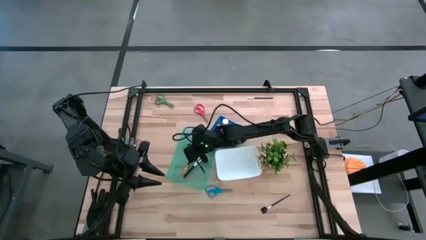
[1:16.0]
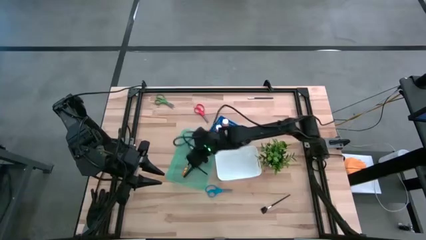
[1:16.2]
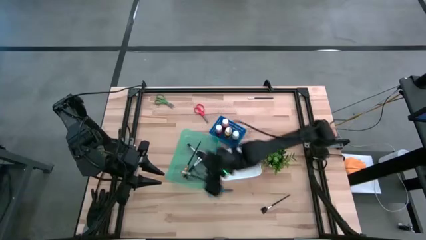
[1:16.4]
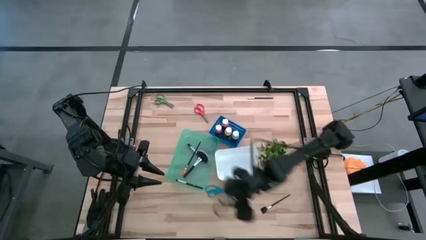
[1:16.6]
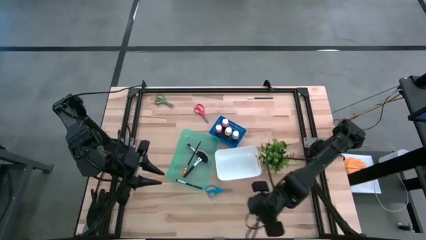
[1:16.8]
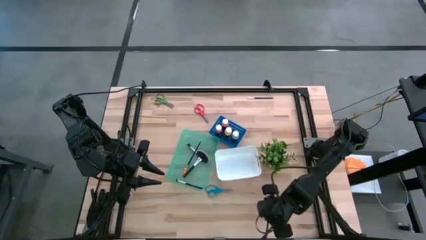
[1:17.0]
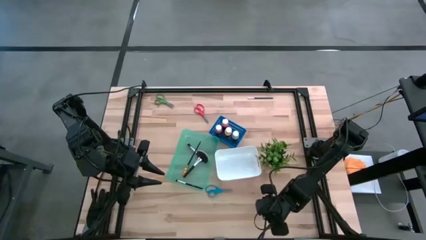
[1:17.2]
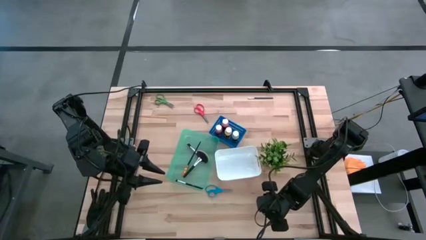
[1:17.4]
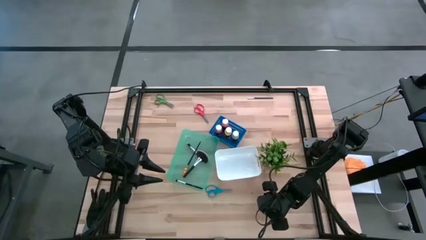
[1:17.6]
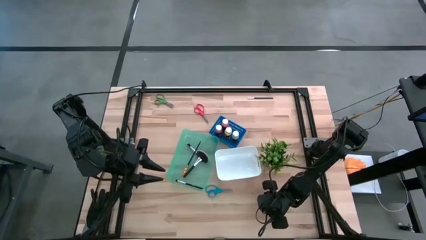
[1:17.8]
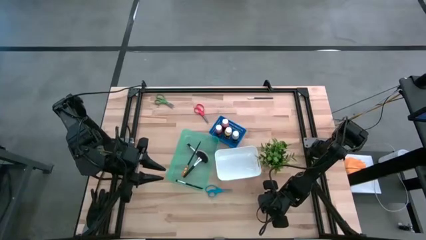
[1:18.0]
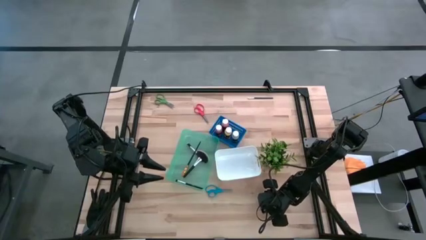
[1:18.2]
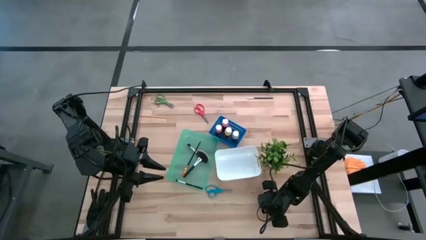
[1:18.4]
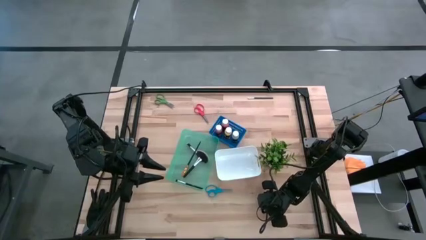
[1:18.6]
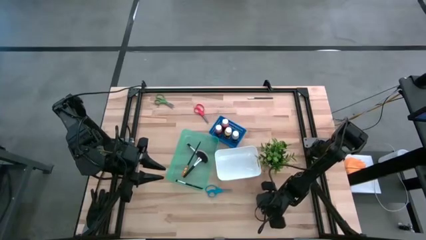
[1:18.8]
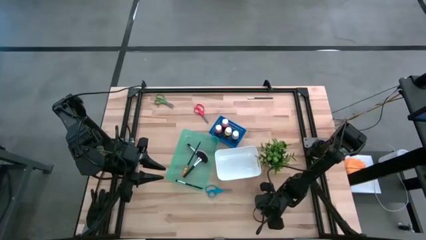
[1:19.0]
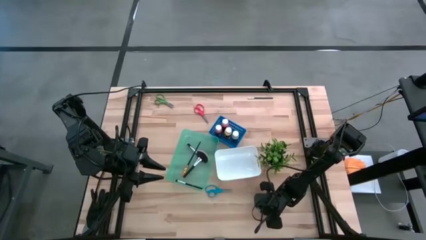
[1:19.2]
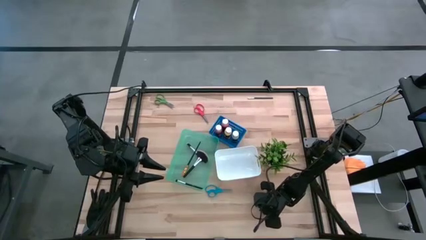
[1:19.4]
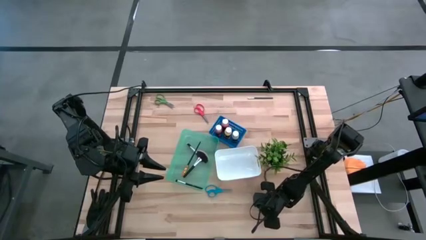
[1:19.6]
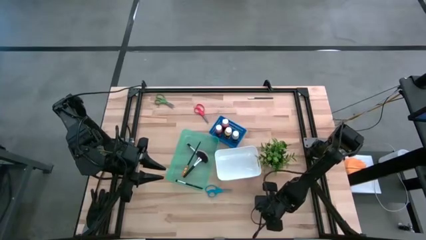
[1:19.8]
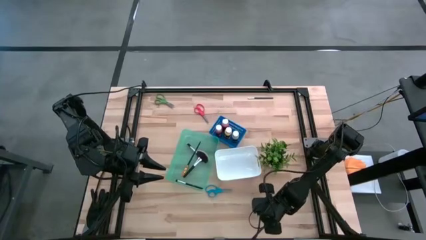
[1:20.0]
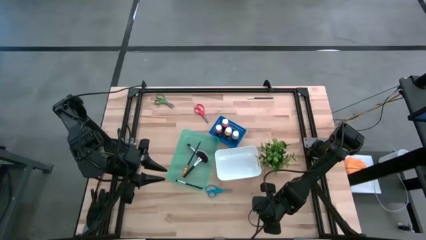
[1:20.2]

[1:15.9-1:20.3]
Task: Pick & Place Paint Supplies
Put the black brow brush into the green bin

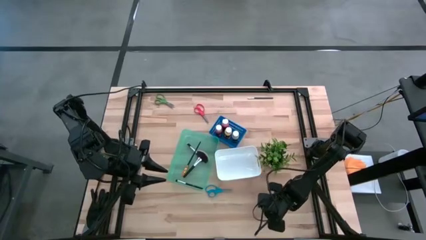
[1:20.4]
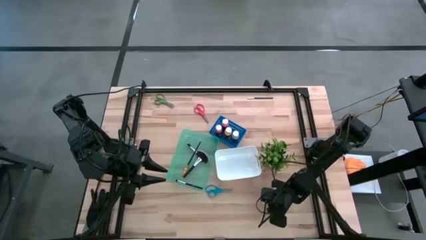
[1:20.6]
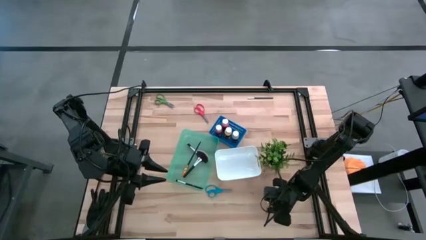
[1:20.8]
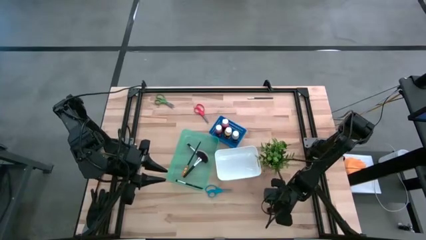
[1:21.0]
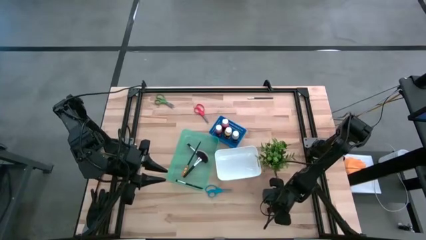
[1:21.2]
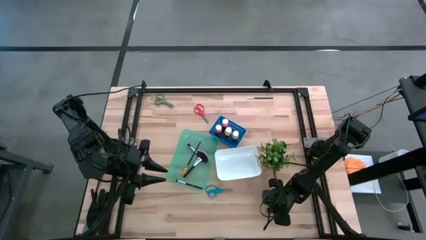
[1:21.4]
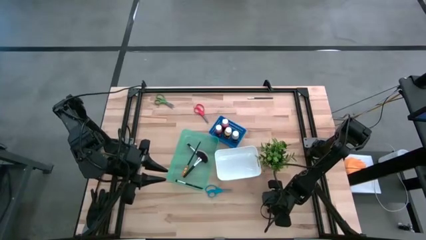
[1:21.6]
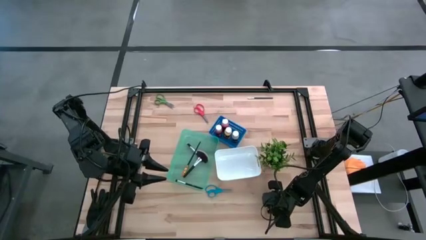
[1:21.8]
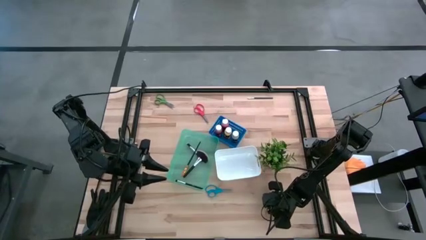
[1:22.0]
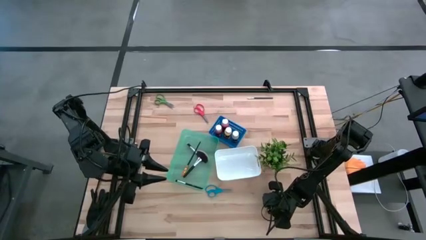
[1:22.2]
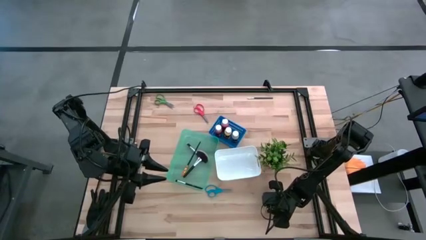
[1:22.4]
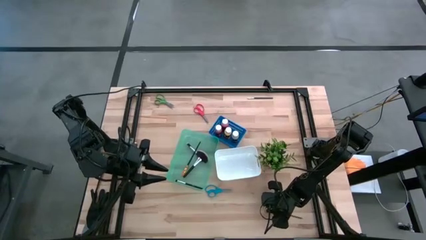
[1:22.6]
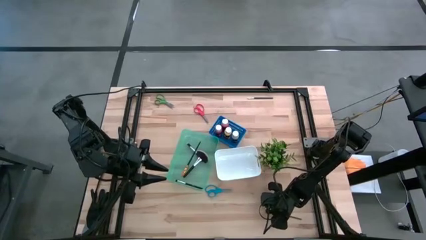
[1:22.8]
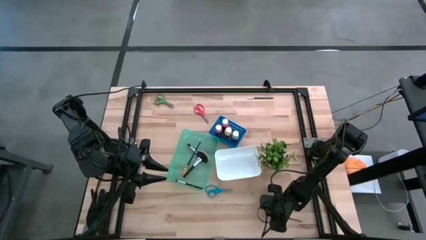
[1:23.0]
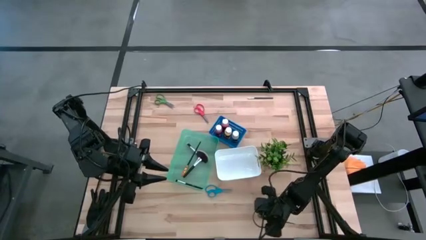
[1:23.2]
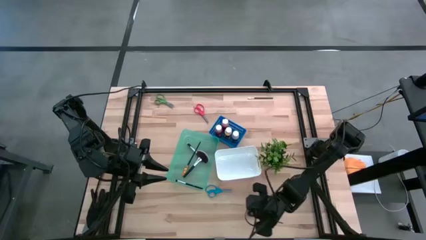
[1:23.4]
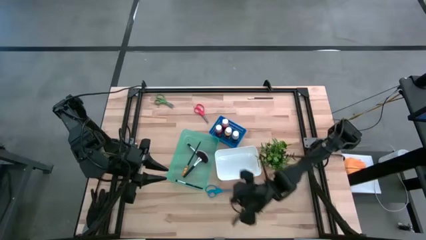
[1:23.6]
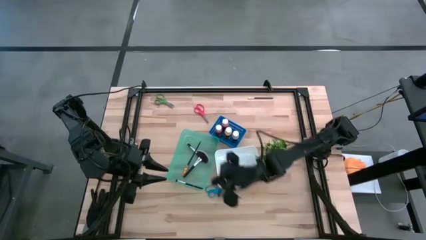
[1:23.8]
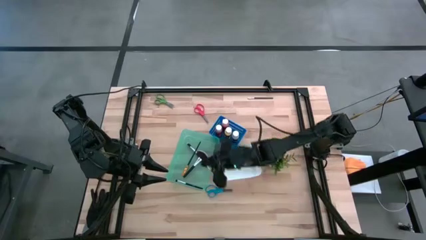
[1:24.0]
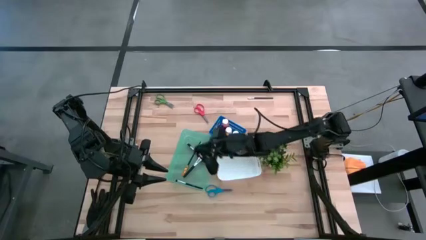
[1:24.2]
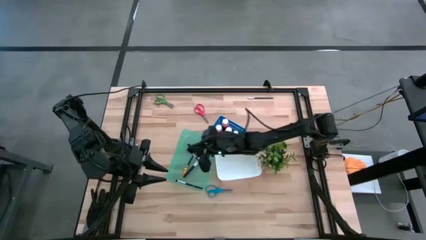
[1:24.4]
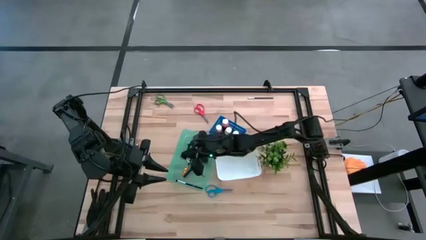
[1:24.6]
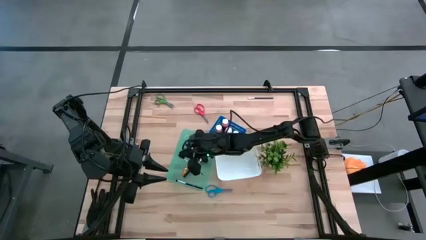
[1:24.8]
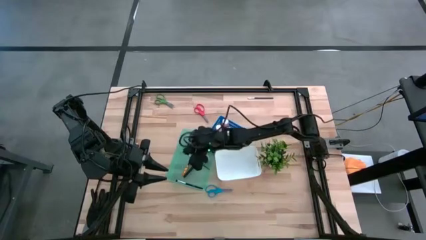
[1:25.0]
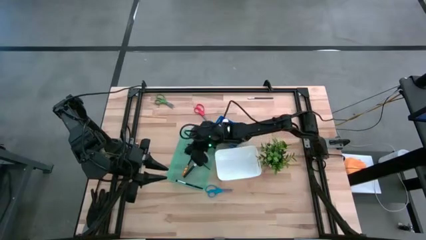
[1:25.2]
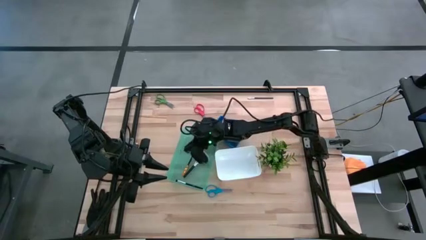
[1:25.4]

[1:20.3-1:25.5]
Put the black brow brush into the green bin

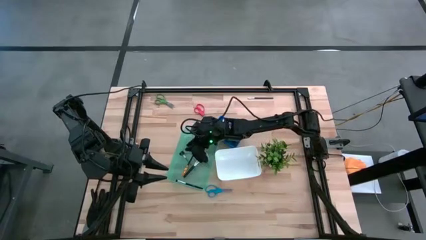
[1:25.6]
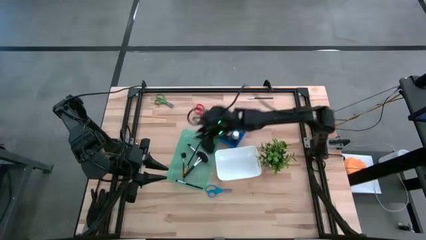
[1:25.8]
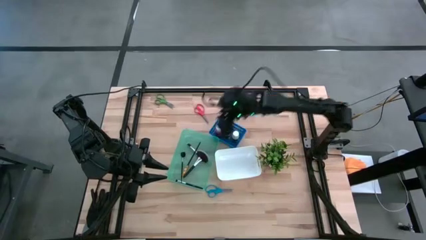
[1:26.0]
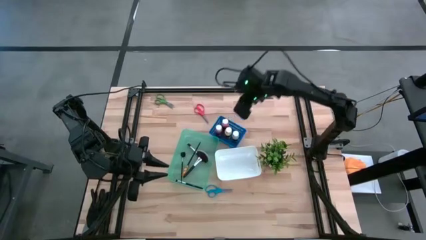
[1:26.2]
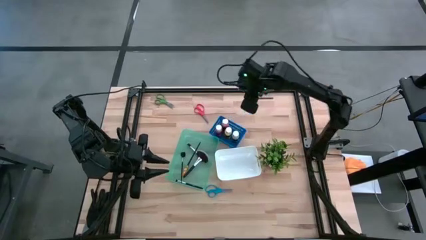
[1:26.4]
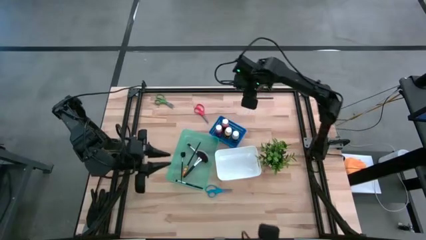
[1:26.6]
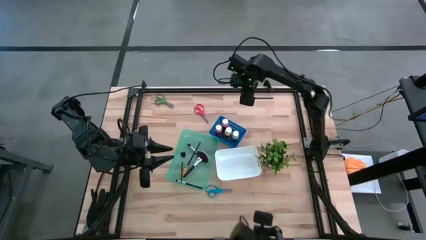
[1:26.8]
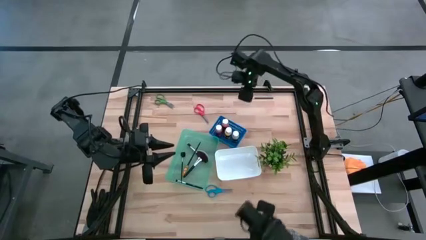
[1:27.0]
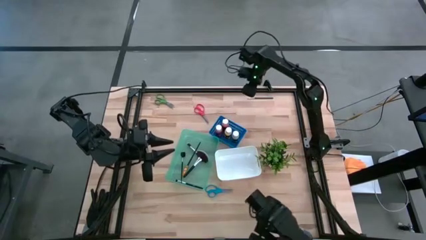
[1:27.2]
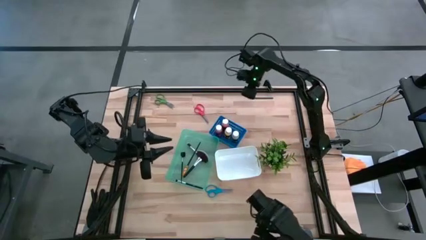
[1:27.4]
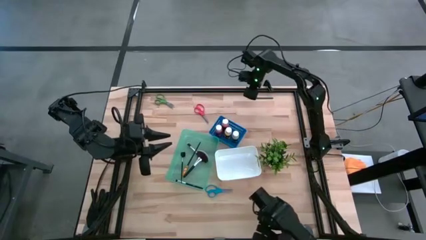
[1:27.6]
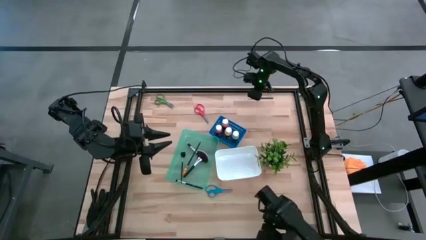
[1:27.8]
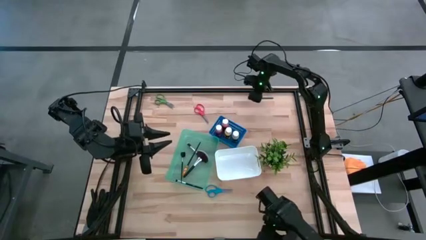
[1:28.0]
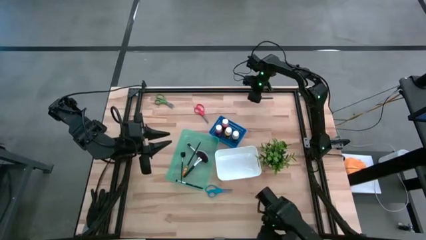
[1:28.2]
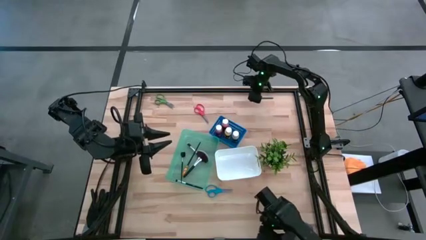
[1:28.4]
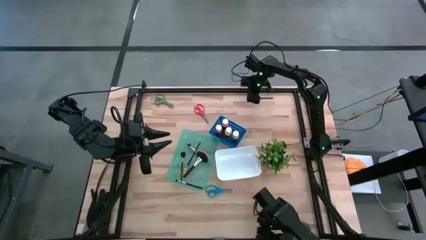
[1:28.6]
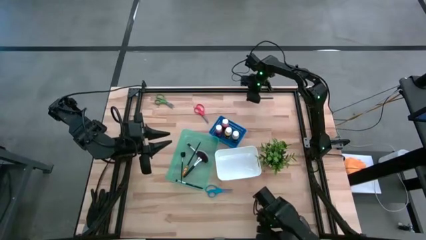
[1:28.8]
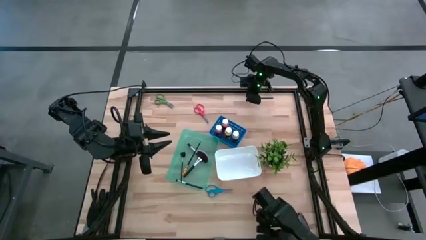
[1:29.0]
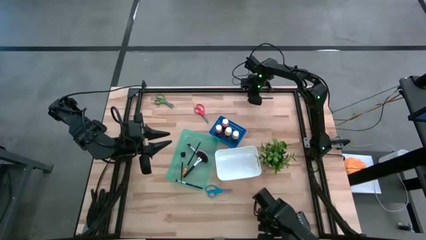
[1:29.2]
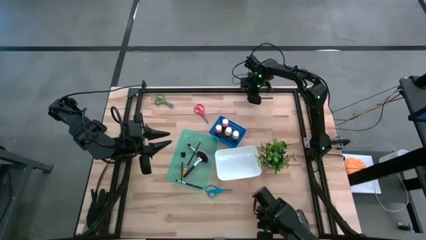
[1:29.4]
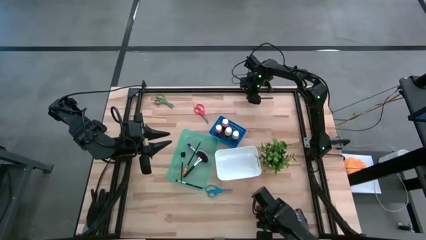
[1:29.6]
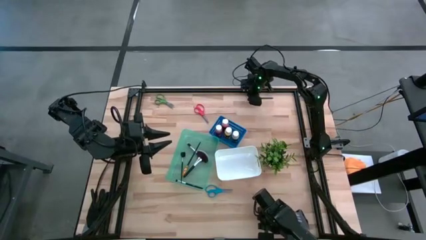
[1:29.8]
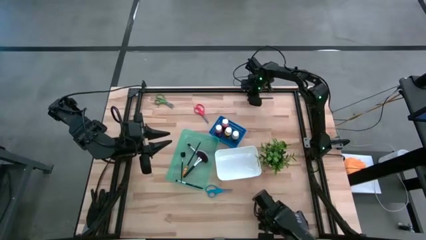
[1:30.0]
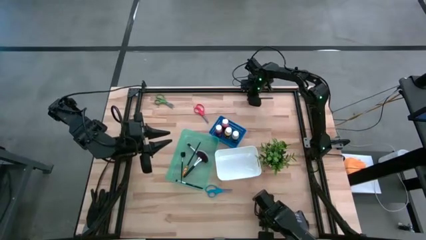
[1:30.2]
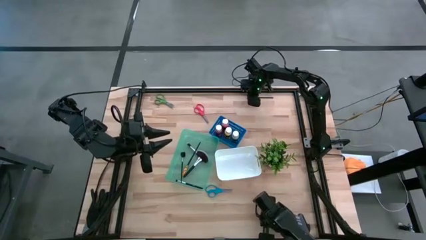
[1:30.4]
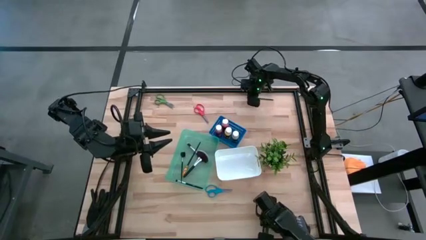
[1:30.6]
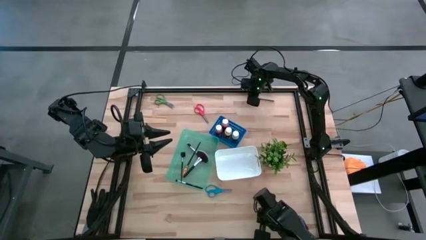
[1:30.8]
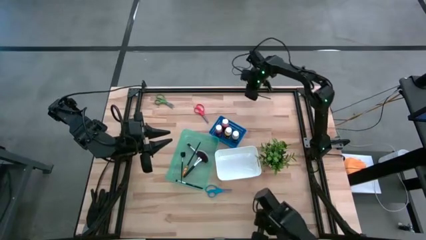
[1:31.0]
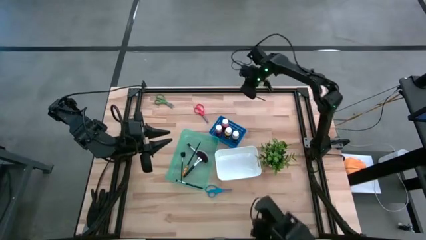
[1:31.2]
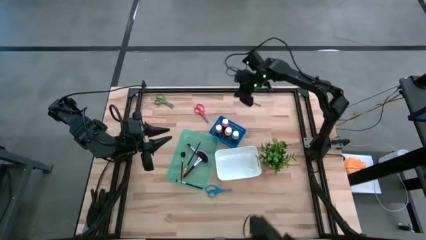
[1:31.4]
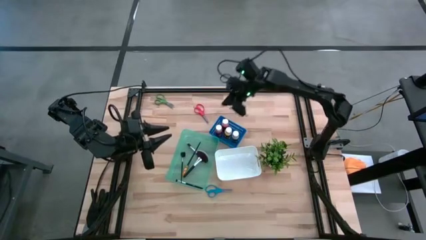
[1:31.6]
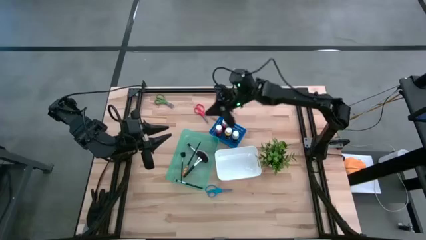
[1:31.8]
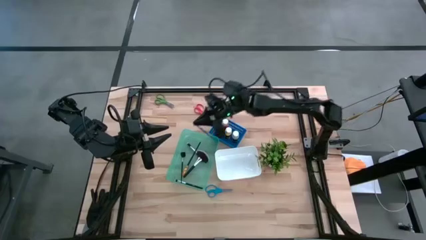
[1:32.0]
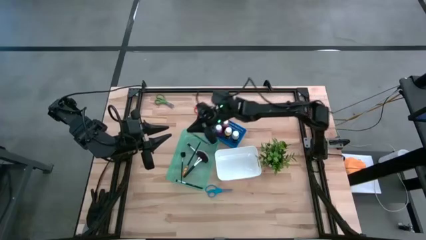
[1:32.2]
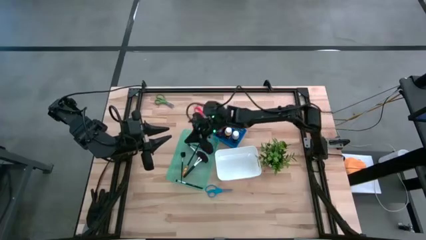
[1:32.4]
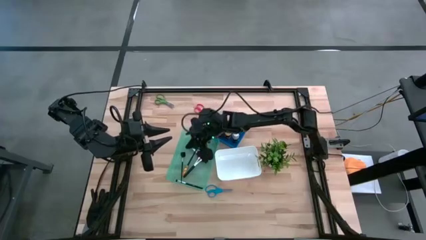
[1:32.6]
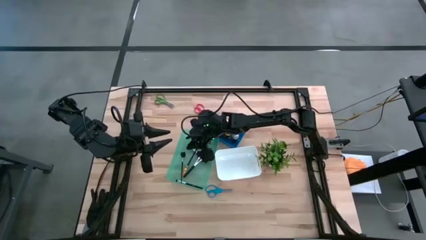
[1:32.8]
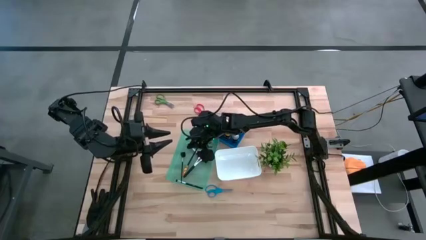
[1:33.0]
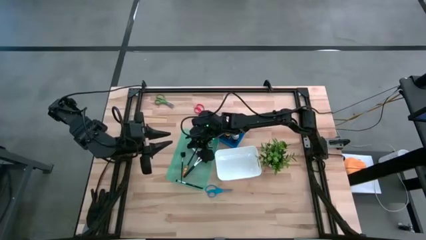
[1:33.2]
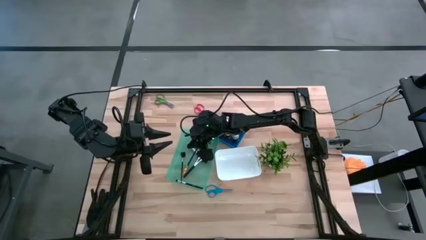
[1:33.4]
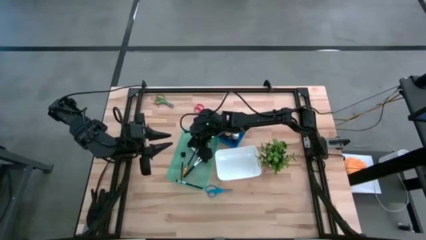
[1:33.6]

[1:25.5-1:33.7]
Put the white eyeshadow brush into the green bin
